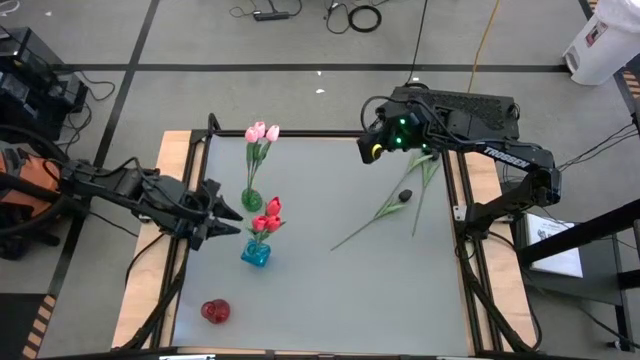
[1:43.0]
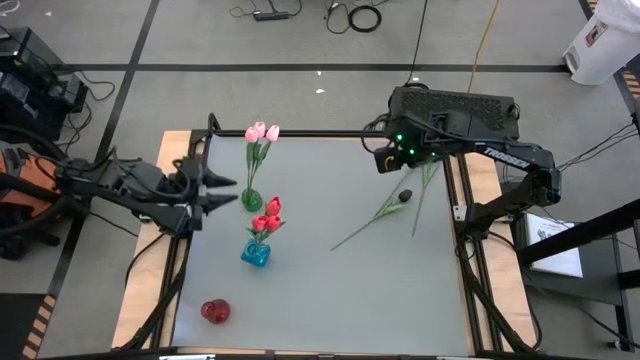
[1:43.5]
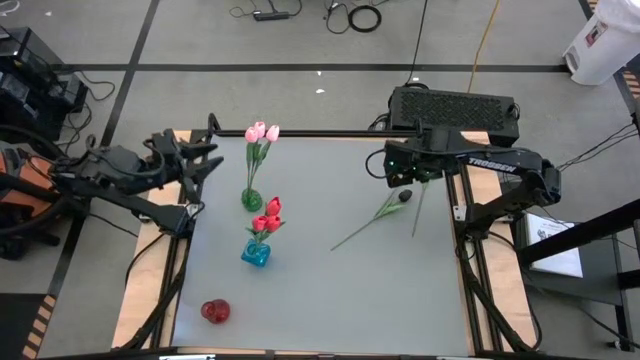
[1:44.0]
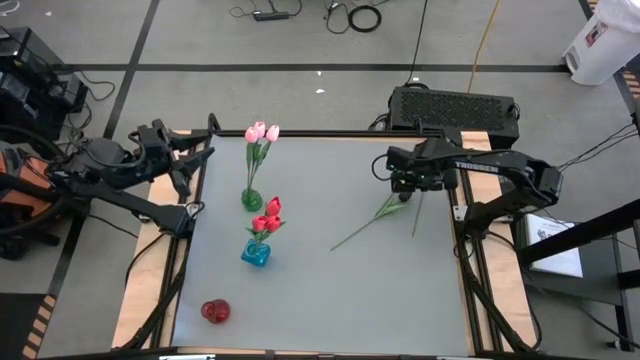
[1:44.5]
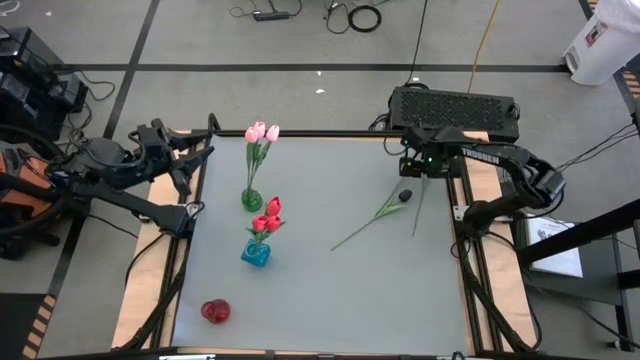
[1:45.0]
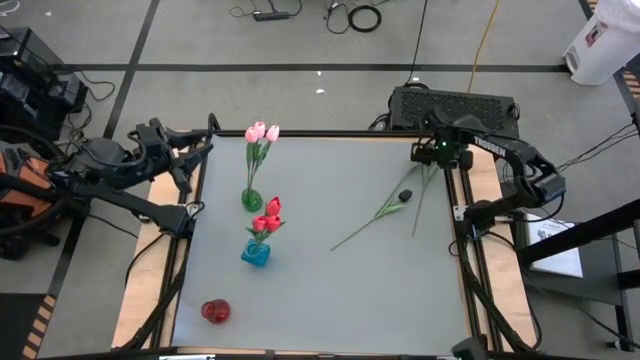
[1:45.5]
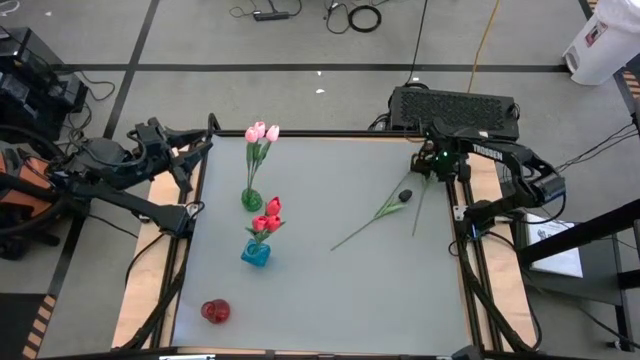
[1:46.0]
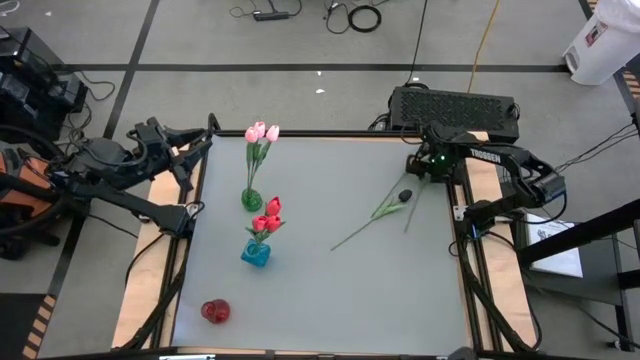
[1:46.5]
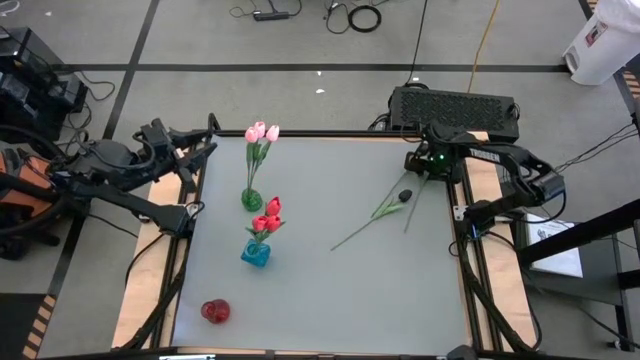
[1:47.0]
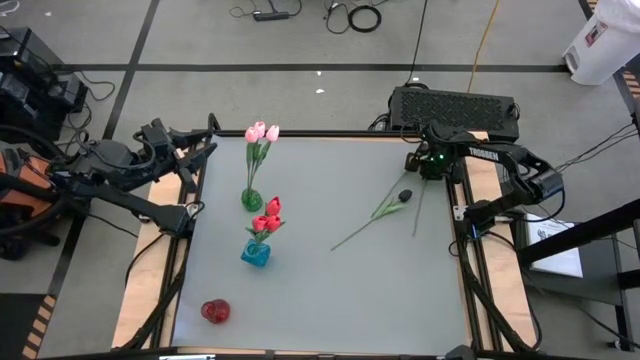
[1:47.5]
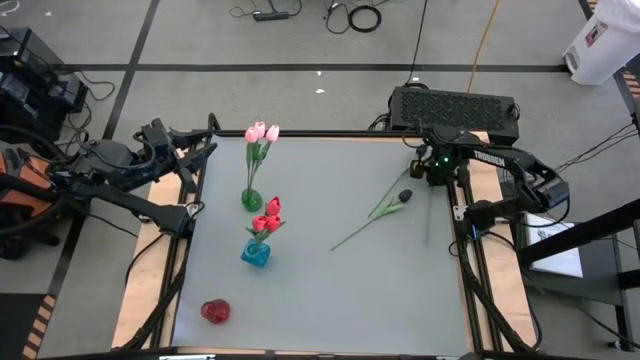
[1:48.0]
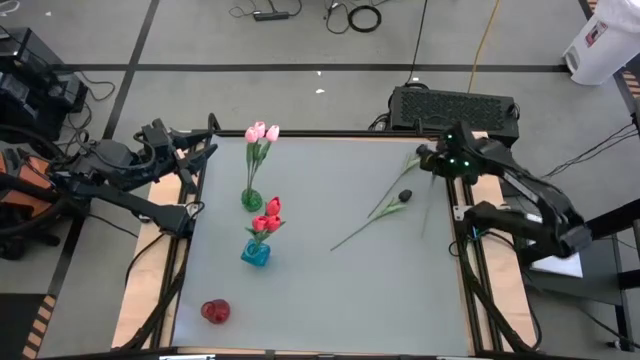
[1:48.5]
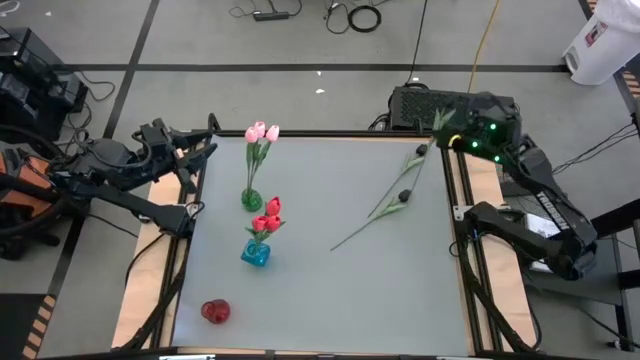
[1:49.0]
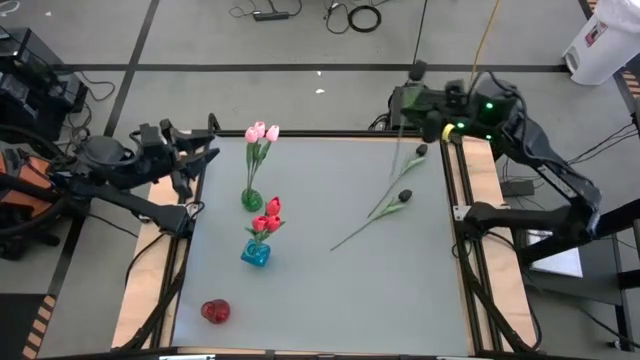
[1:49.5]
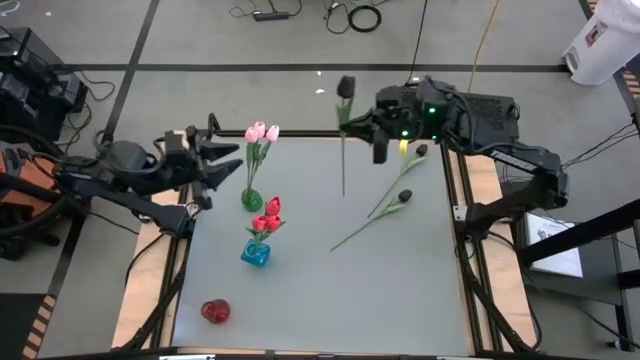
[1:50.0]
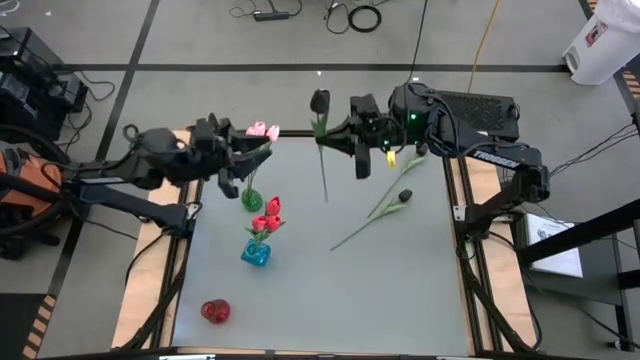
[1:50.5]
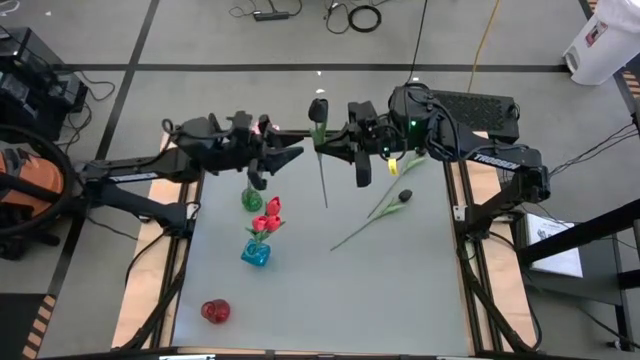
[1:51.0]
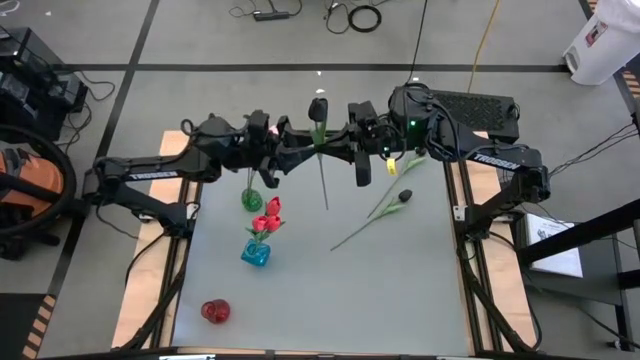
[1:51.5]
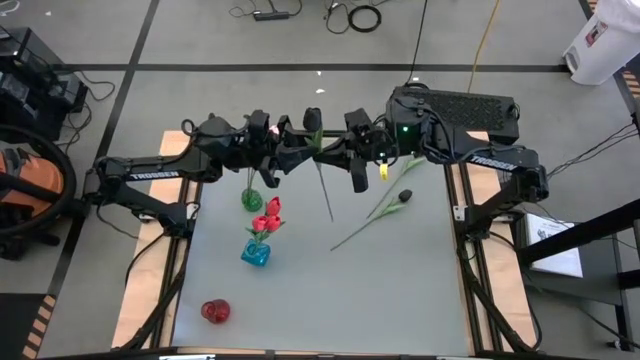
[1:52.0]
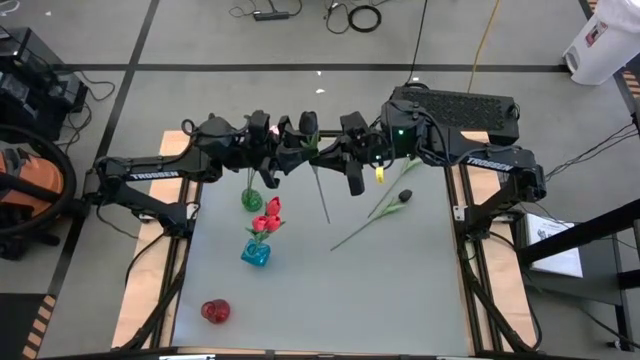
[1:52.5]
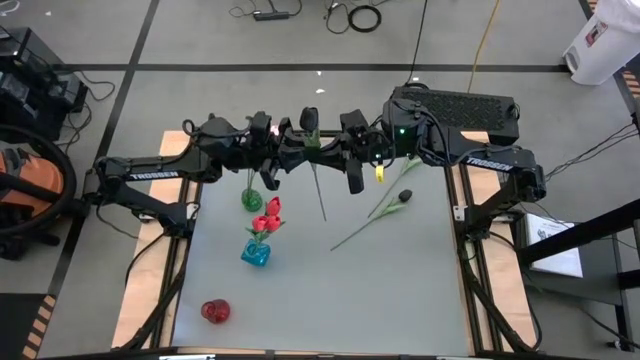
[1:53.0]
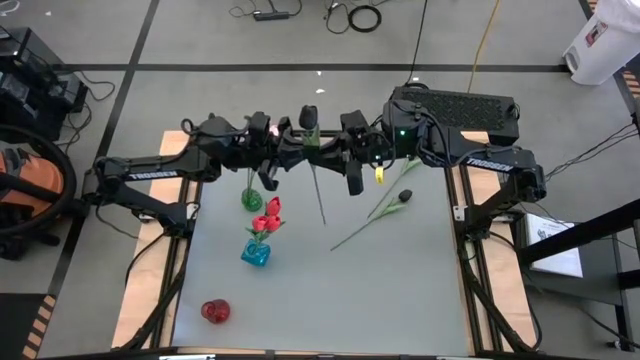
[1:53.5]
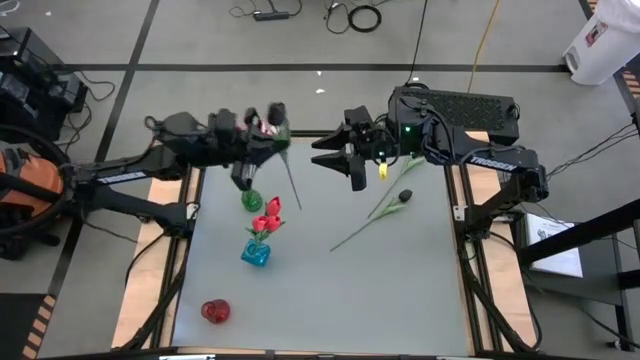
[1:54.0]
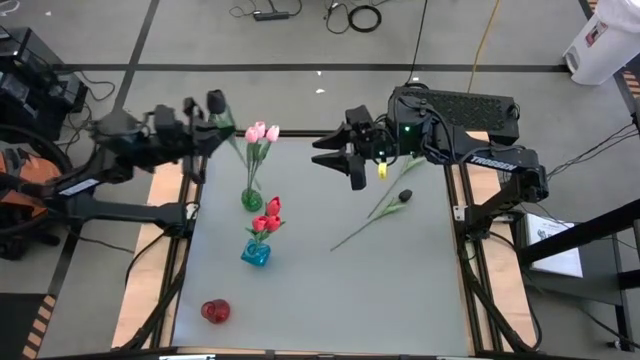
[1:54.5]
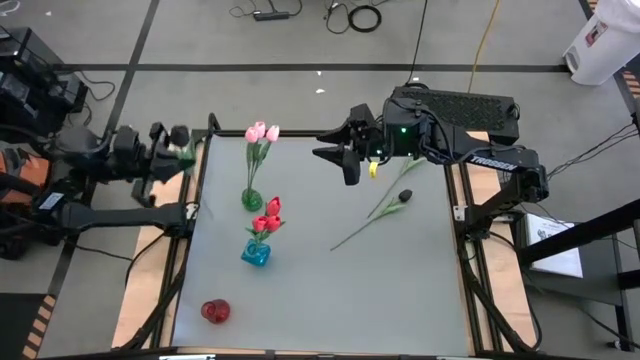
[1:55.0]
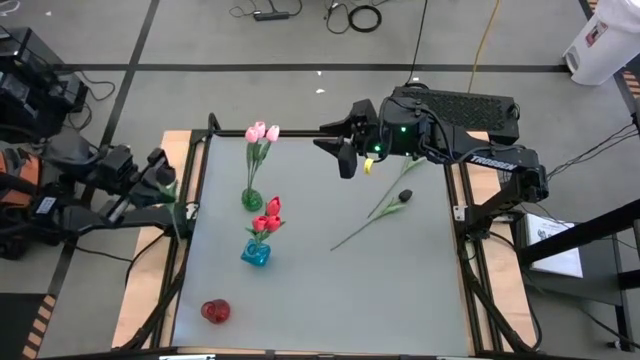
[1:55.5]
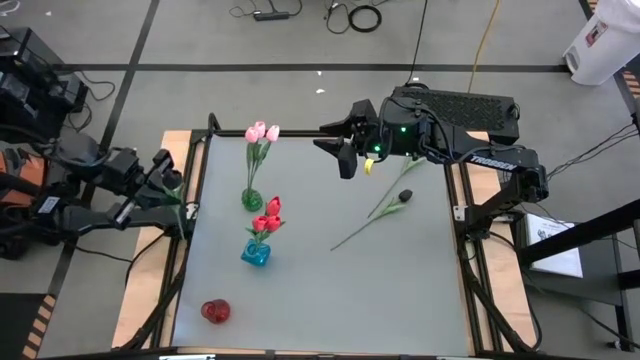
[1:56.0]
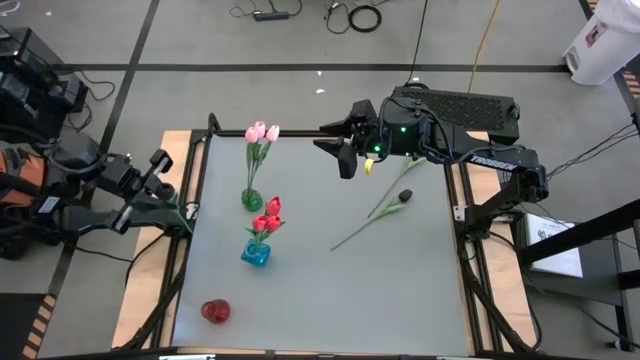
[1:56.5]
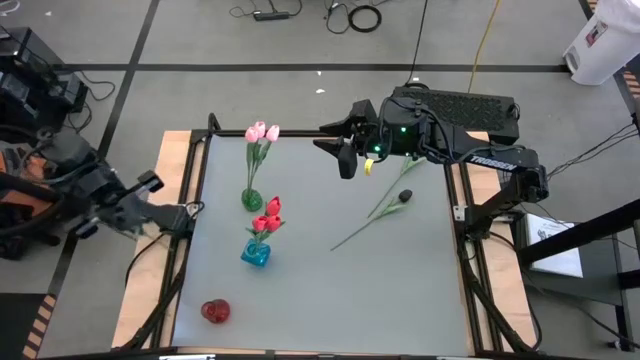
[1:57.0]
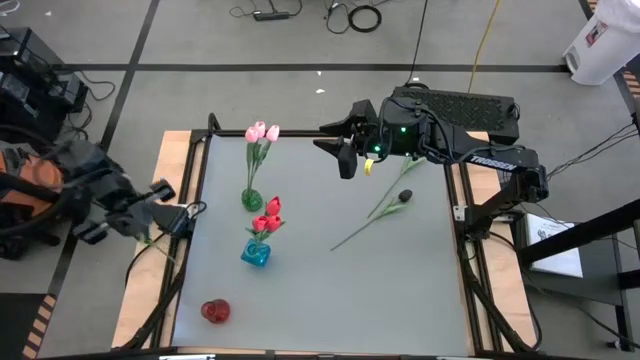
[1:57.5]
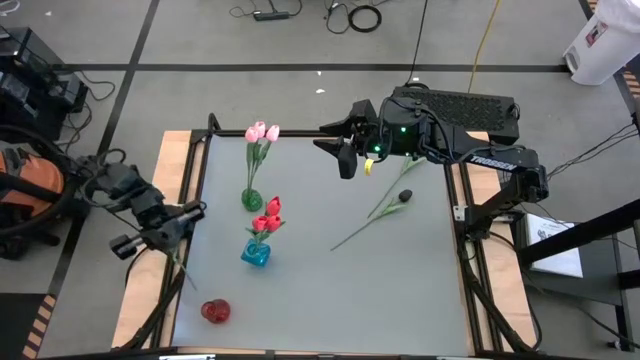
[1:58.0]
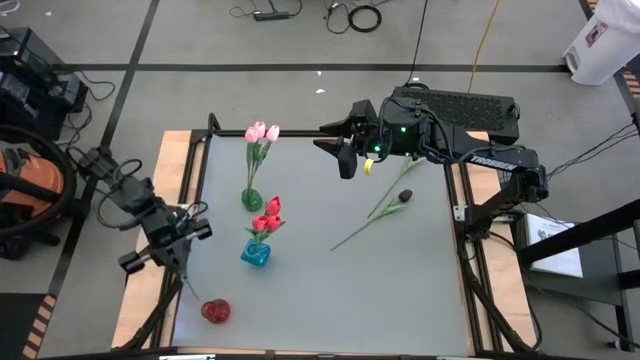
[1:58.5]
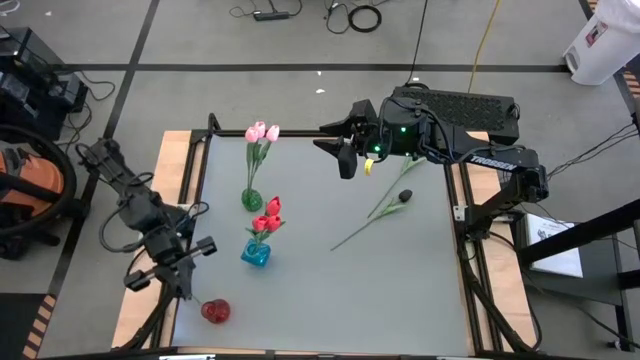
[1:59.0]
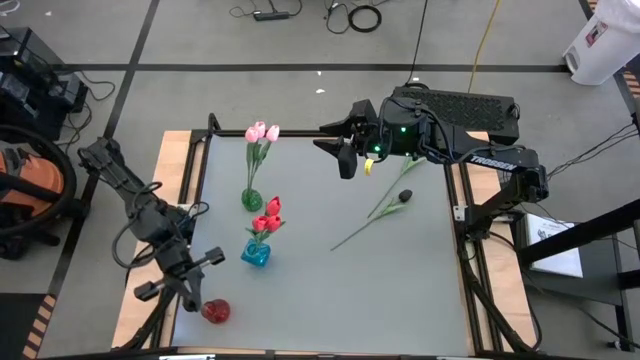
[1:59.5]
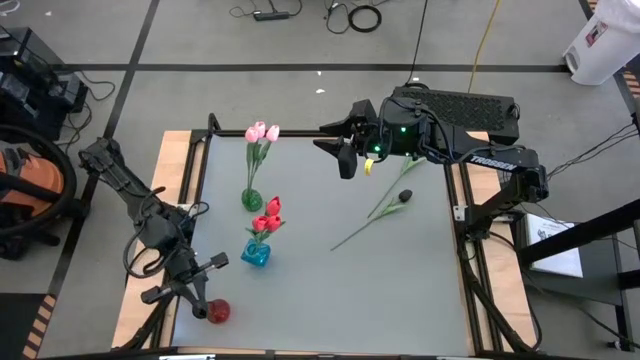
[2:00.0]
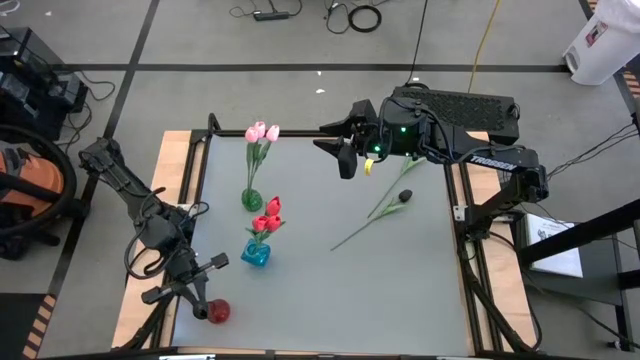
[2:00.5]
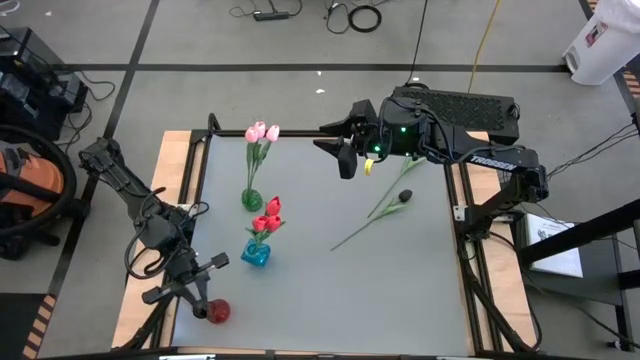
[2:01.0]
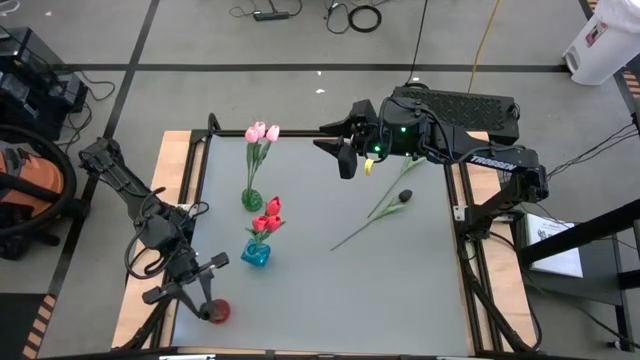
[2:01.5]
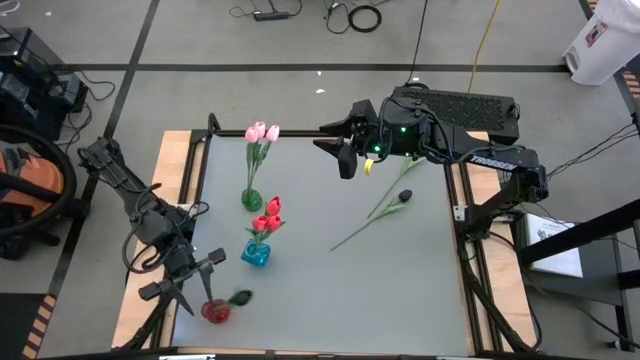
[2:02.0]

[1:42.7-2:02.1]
Task: Sort flowers into vase by color
Put the top right black flower into the red vase

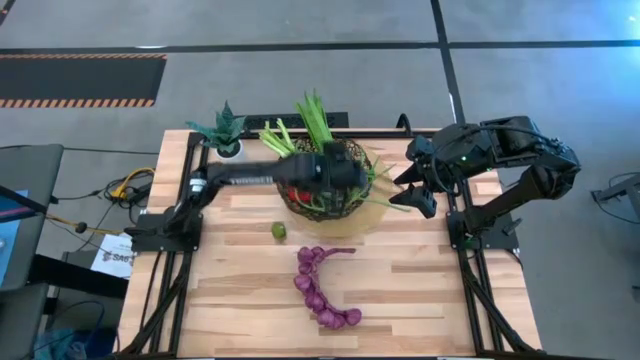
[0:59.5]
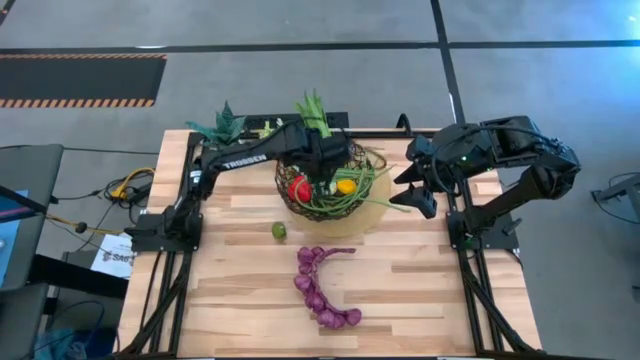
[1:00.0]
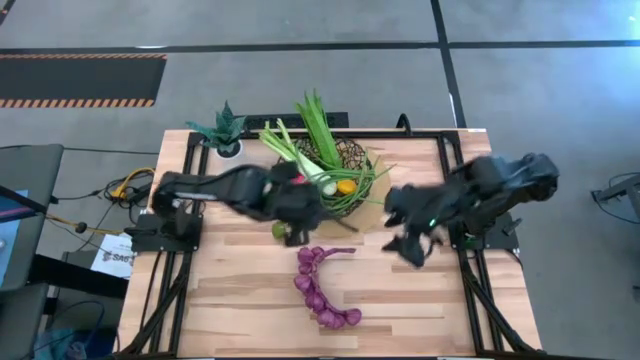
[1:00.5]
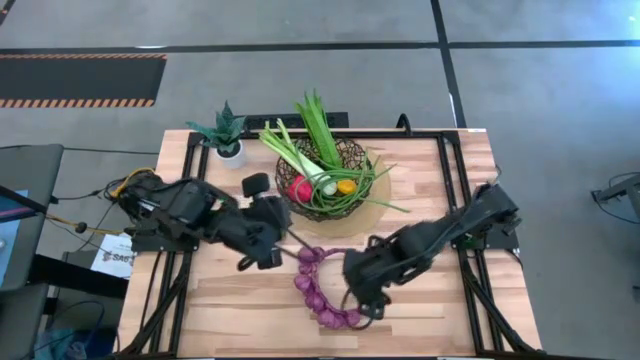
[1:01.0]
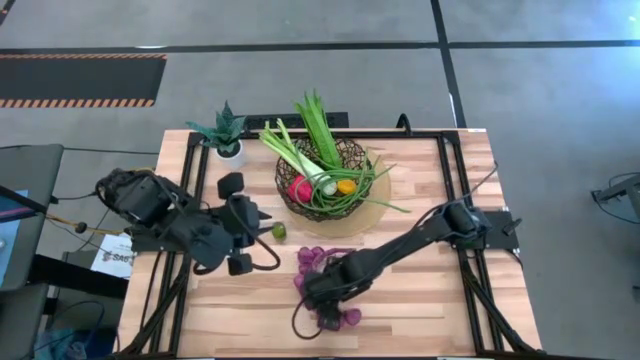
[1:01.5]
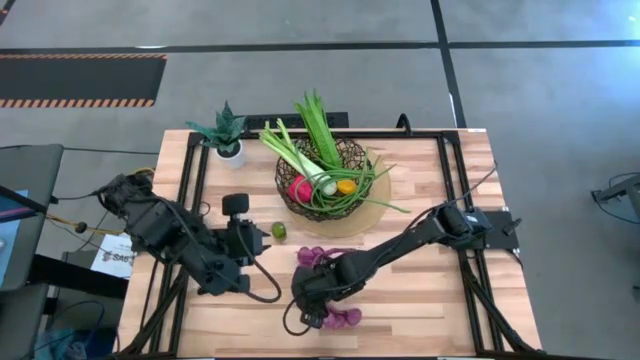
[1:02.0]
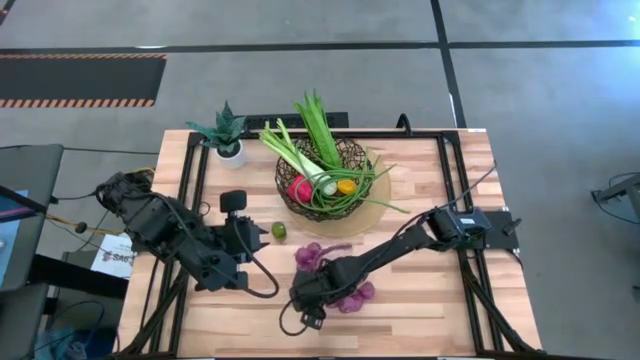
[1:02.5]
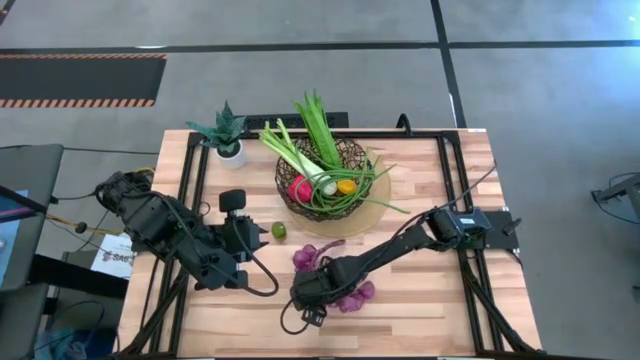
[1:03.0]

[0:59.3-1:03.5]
Task: Build produce basket
Put the purple garlic into the basket
